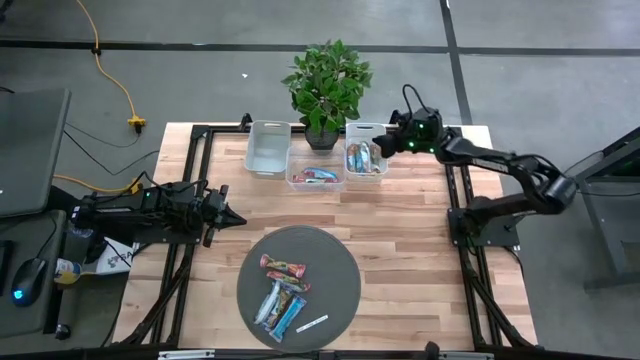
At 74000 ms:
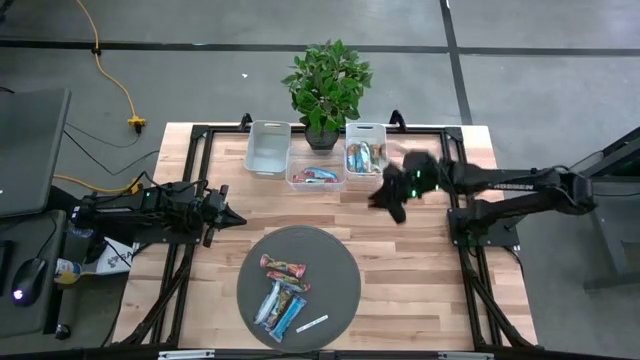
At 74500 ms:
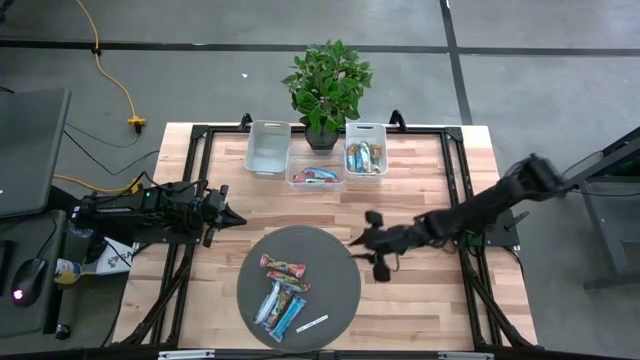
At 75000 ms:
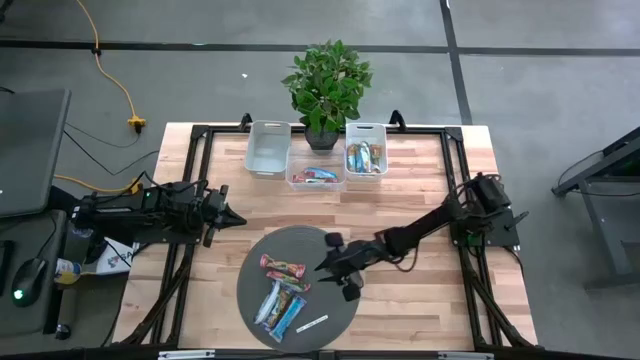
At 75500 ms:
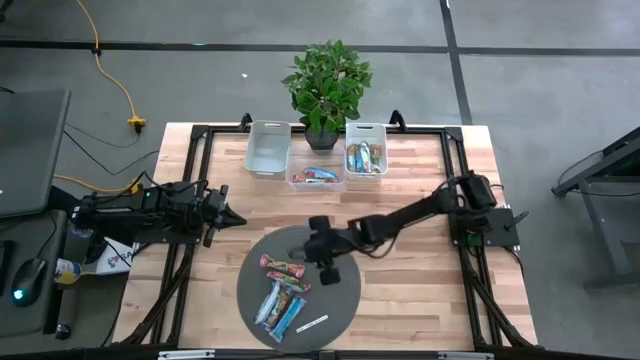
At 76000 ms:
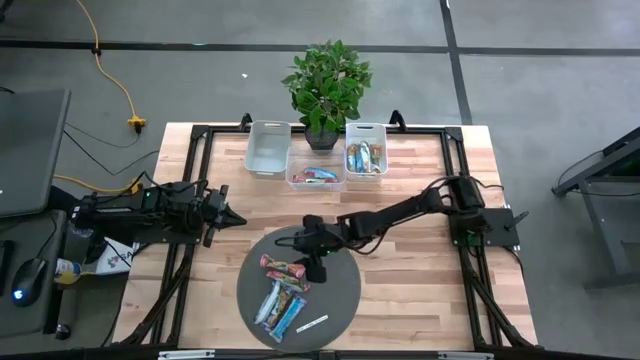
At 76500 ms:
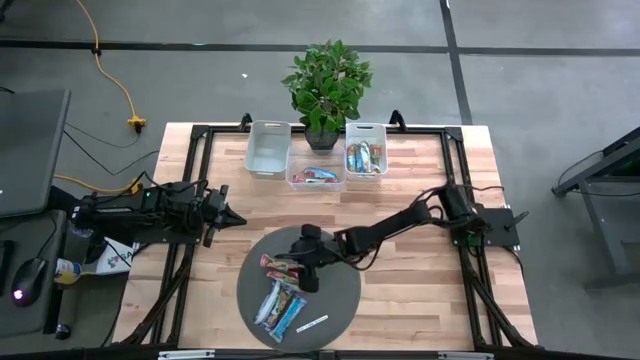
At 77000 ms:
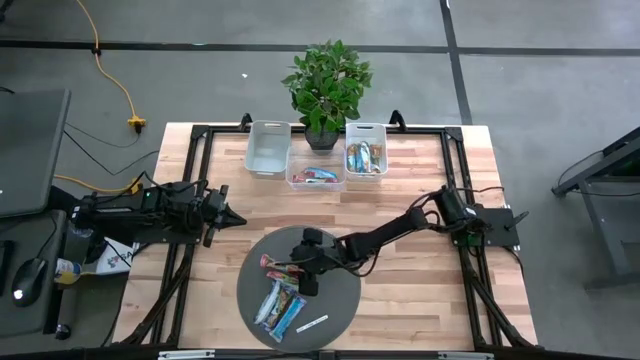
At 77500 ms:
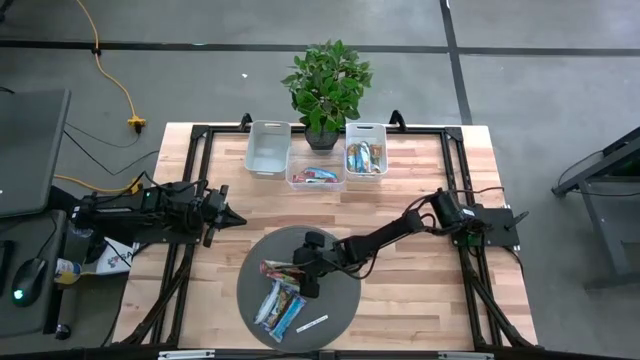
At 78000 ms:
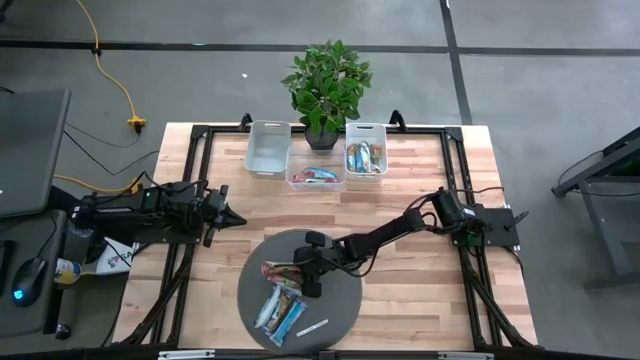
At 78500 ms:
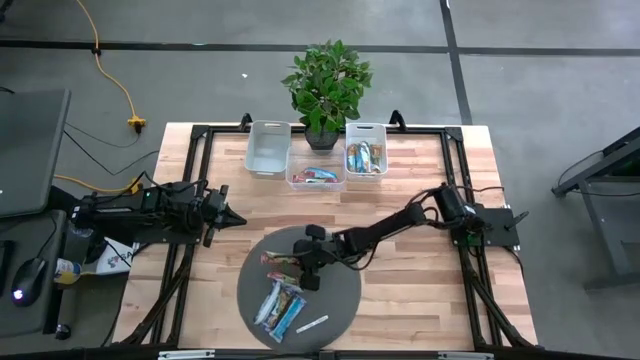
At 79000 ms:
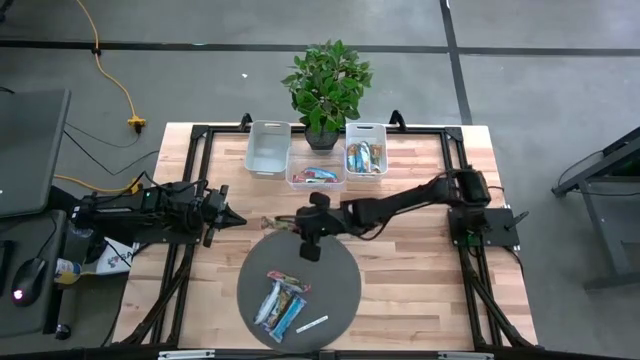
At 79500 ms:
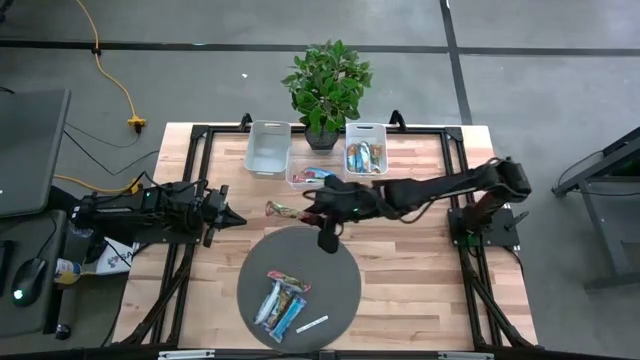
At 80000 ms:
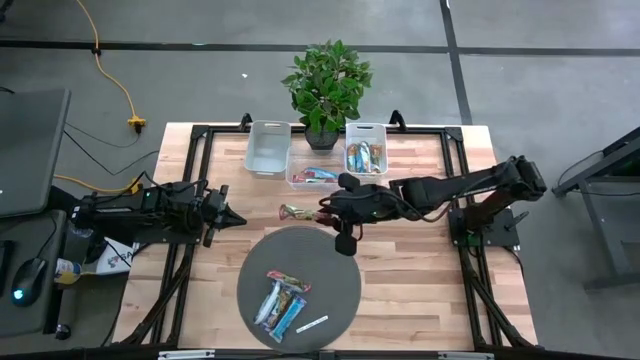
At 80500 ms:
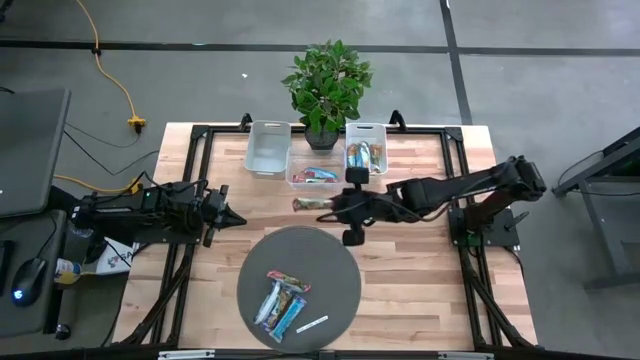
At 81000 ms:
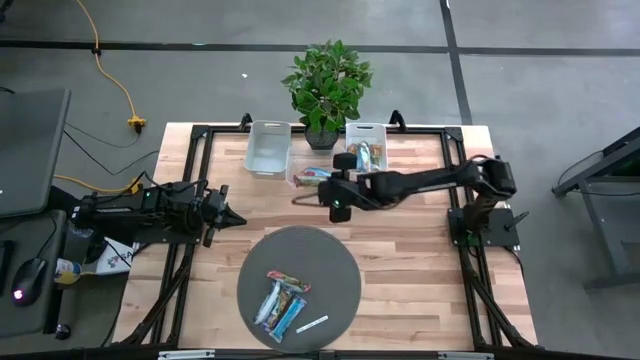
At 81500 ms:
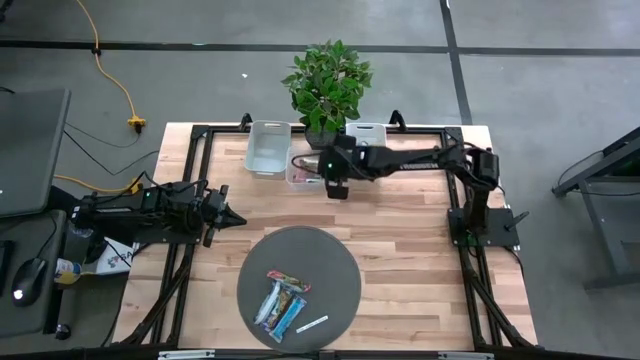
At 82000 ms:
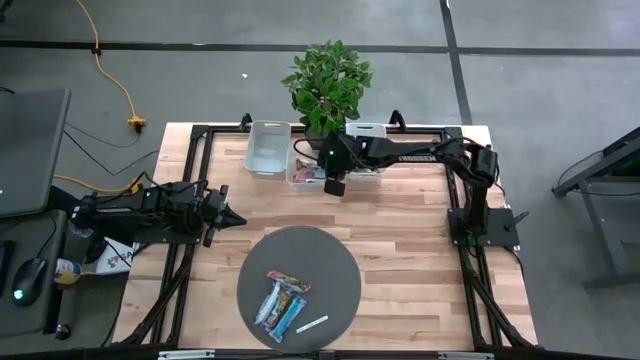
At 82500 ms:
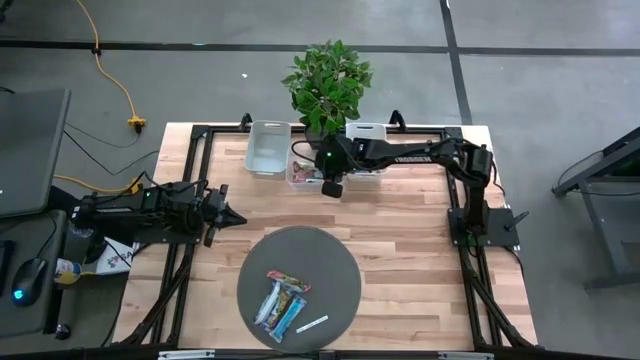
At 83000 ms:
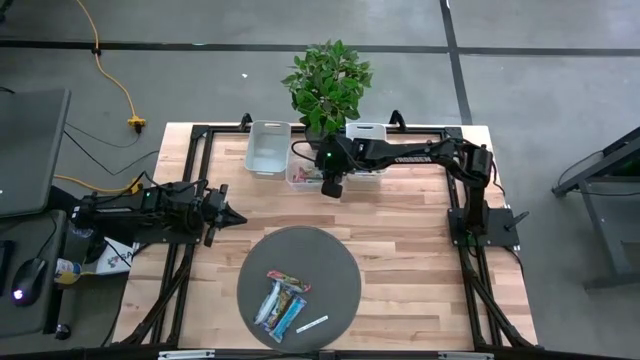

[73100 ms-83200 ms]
Task: Pick and place Granola Bars by type
Put the red granola bar into the transparent bin

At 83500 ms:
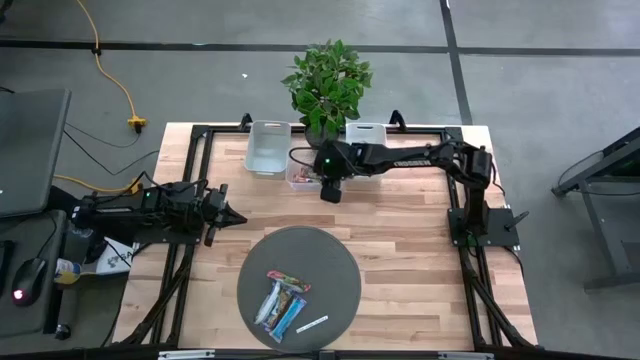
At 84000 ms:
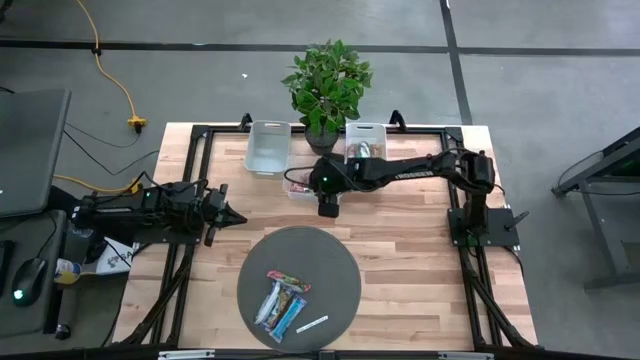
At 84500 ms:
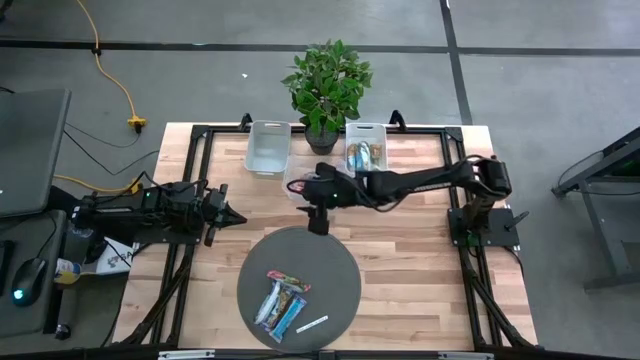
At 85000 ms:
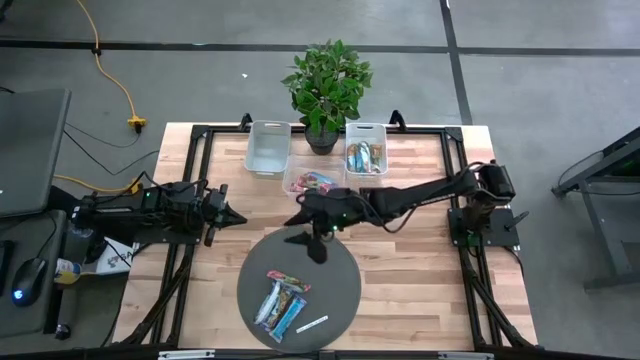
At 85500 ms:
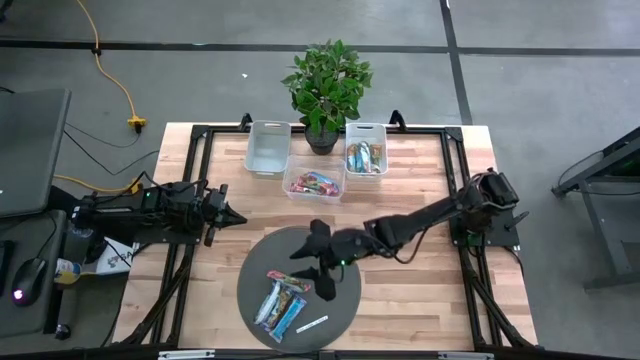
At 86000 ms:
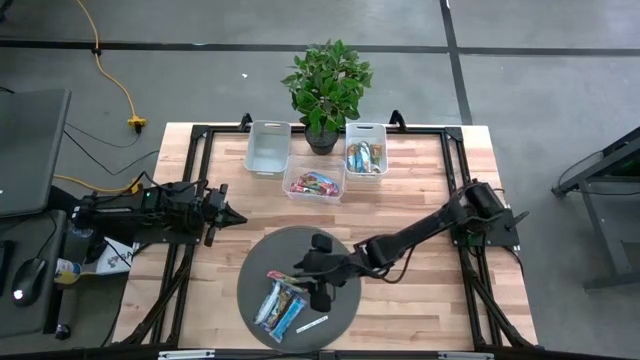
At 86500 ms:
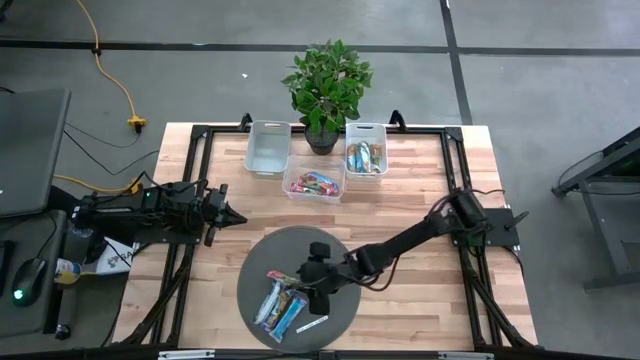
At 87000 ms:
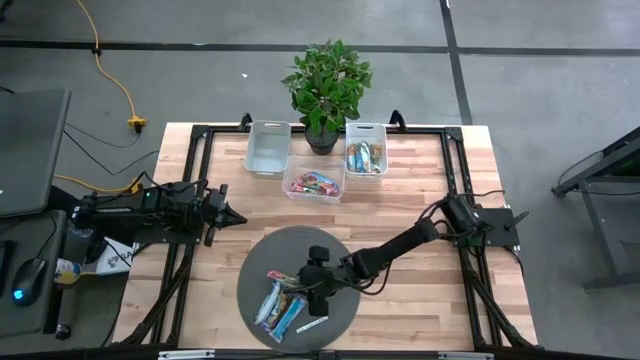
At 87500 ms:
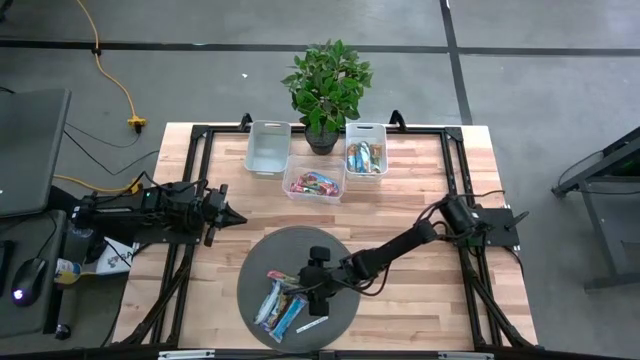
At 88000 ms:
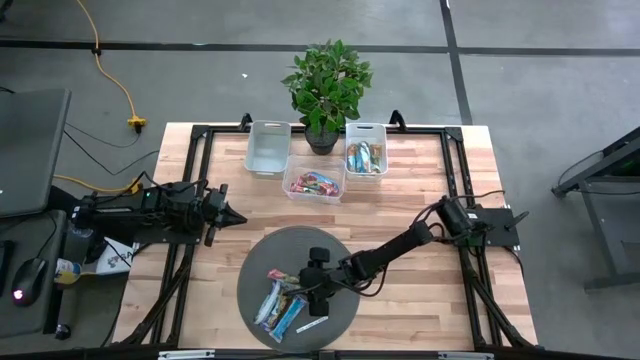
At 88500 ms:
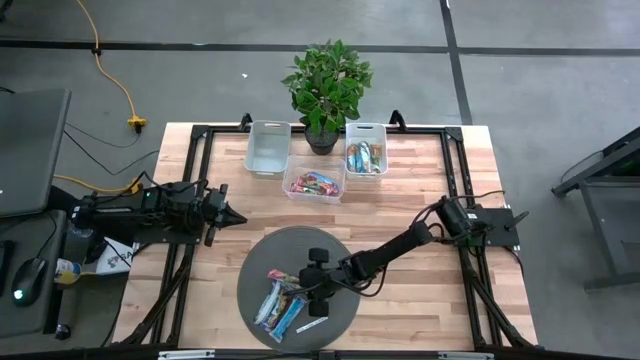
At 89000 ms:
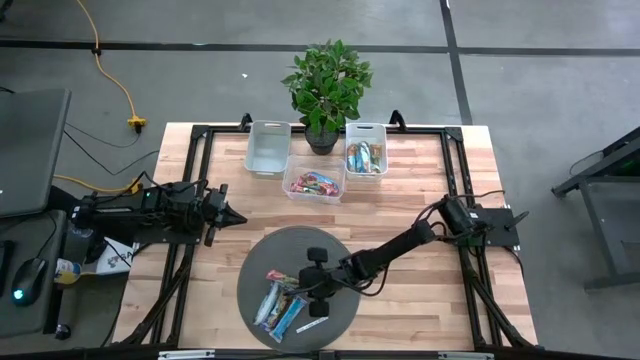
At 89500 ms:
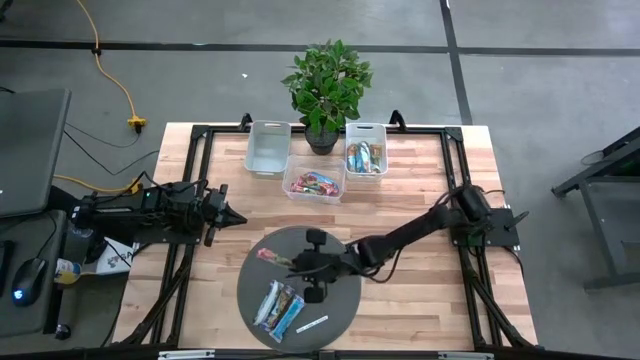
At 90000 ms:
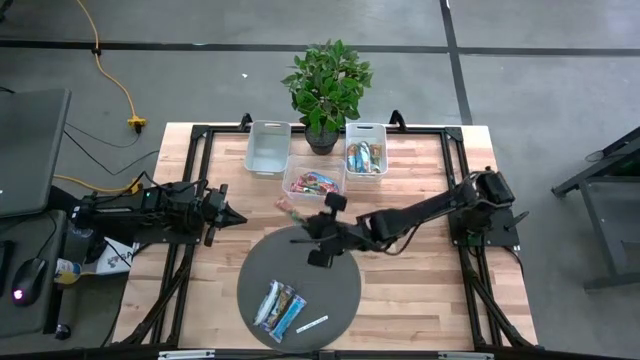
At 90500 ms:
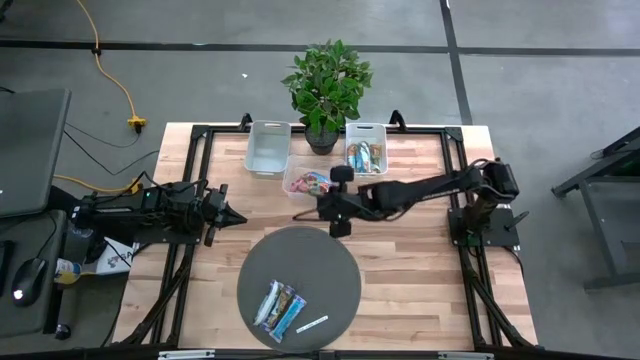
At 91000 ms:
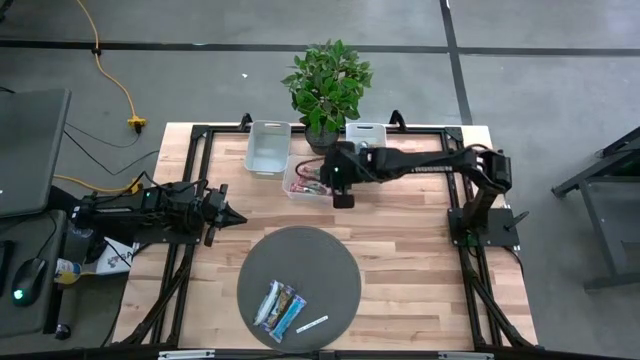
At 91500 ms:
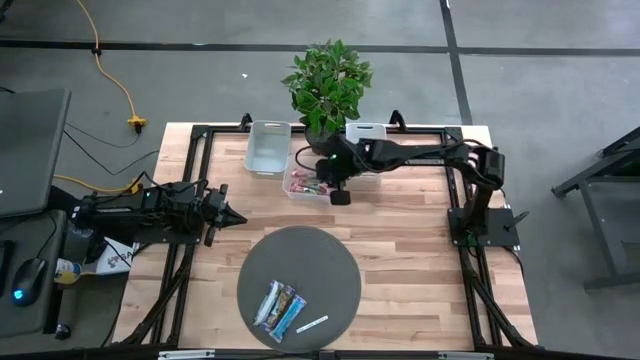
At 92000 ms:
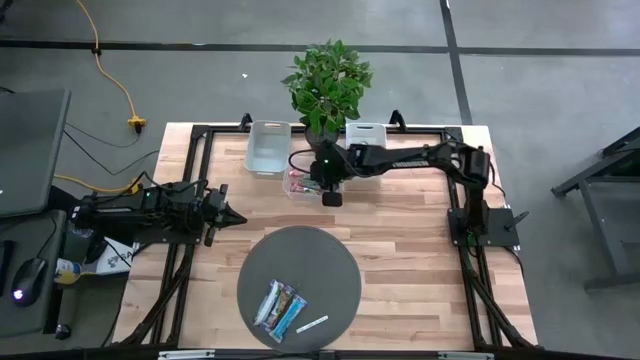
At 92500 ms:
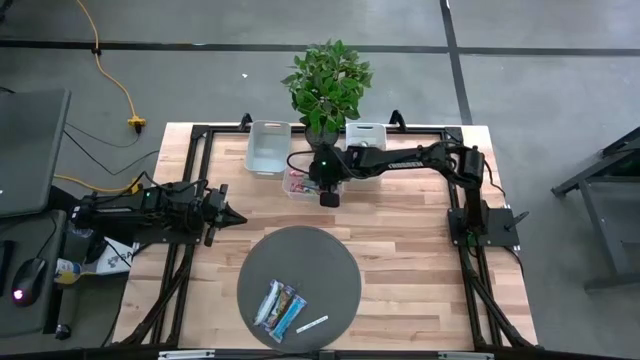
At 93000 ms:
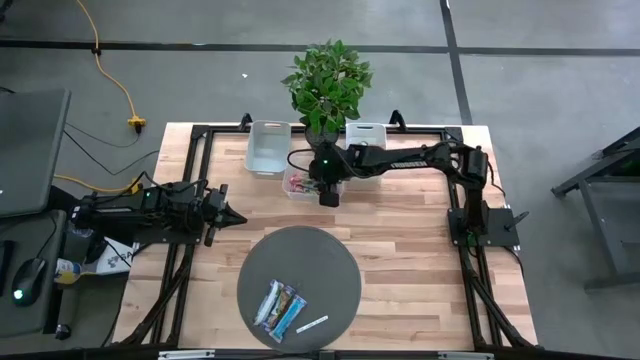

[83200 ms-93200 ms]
Put the red granola bar into the transparent bin

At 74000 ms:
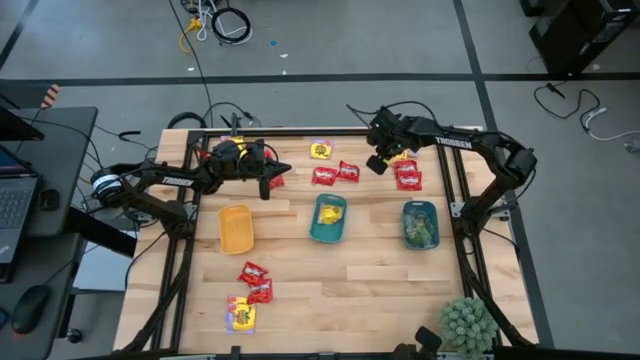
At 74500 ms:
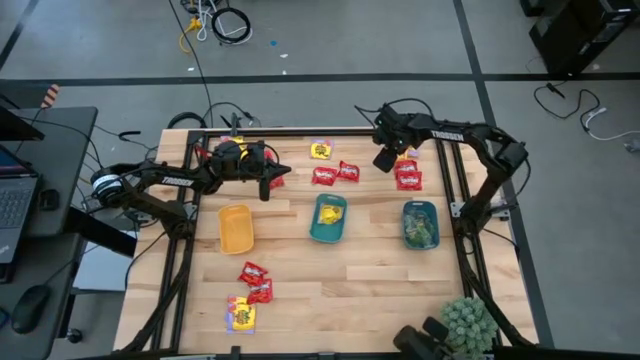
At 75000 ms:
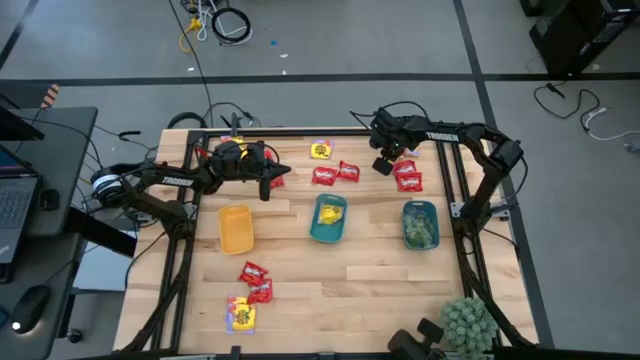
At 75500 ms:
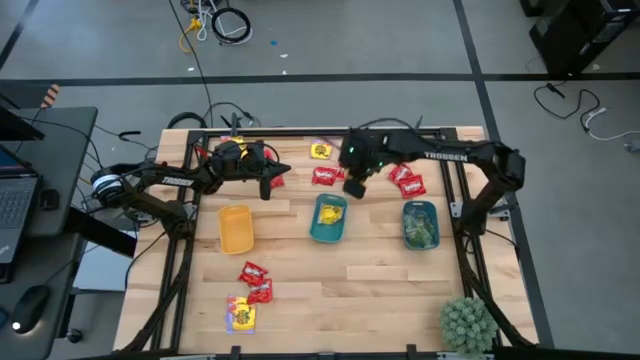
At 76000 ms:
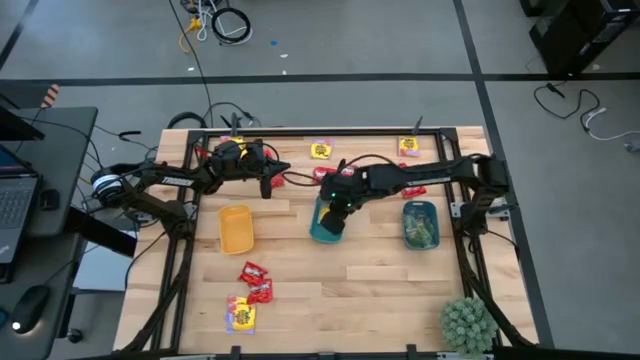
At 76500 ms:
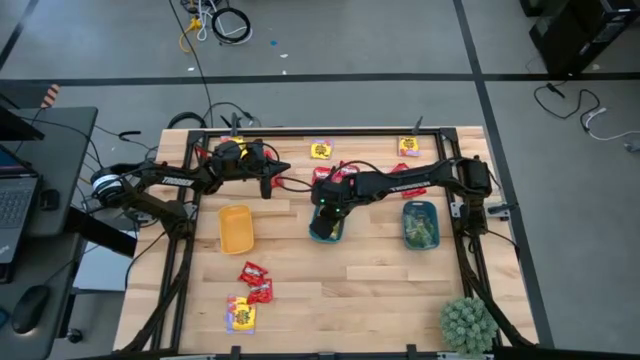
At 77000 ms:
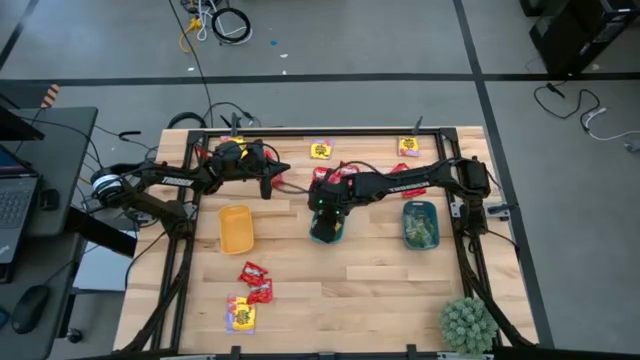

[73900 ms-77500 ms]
Task: Sort candy
Put the yellow candy pack into the green bin
